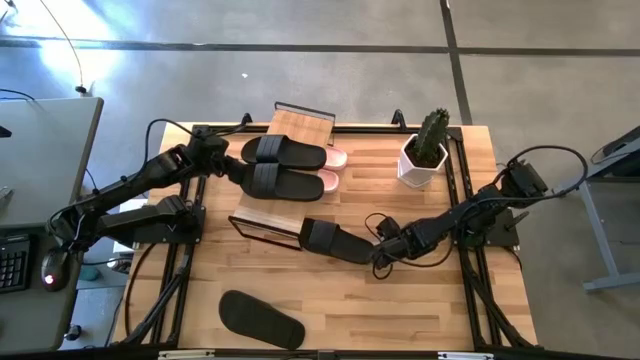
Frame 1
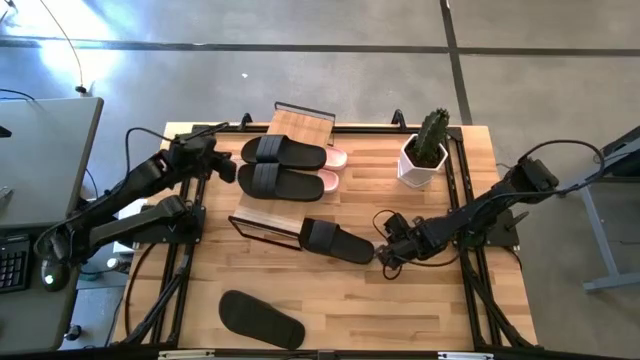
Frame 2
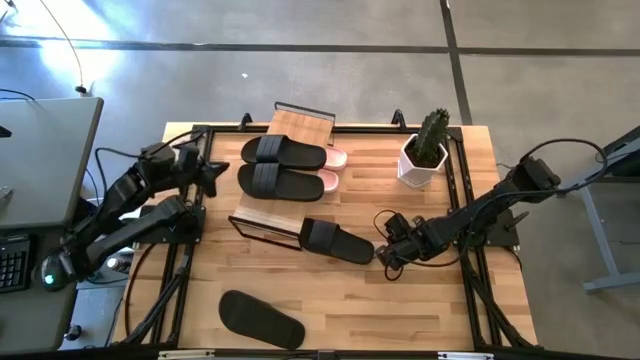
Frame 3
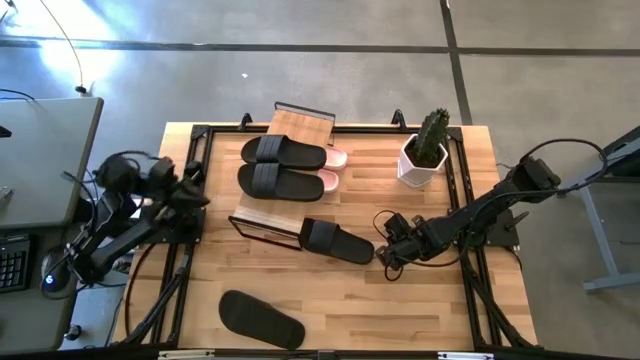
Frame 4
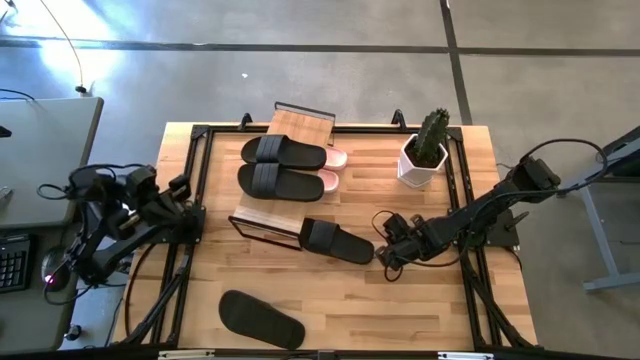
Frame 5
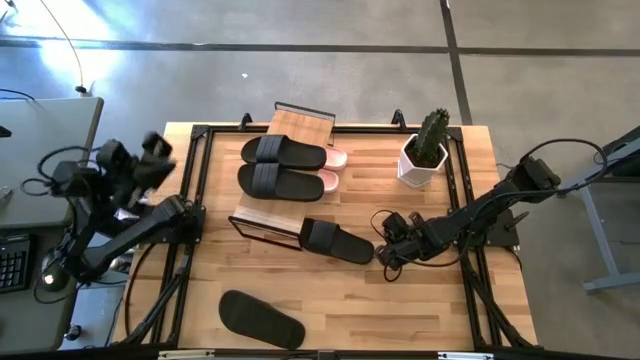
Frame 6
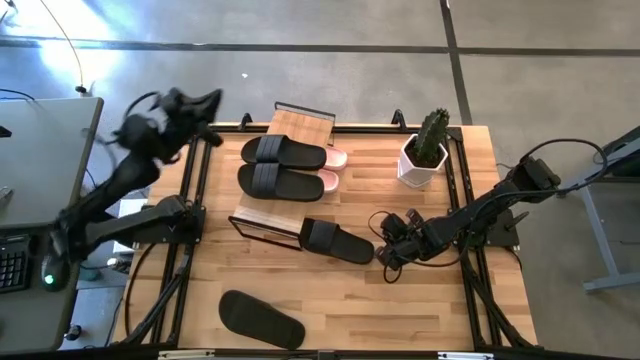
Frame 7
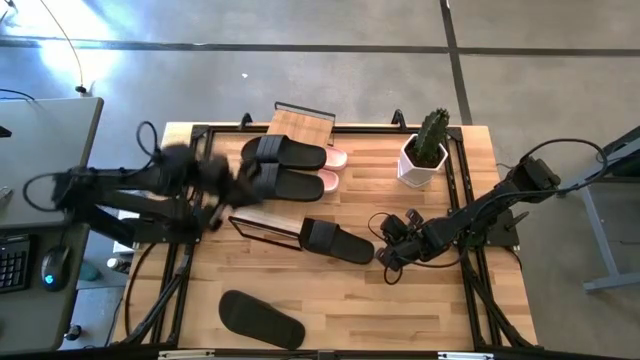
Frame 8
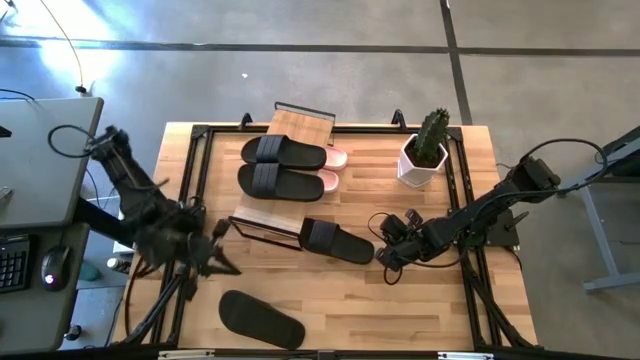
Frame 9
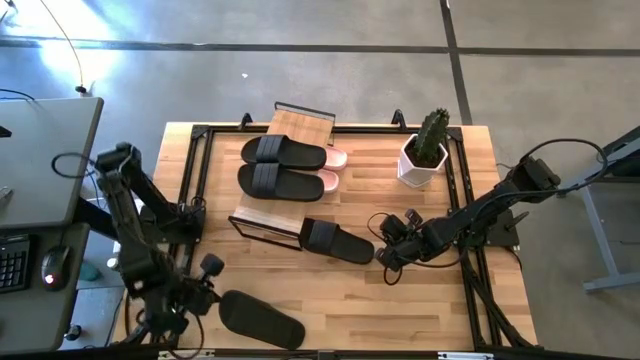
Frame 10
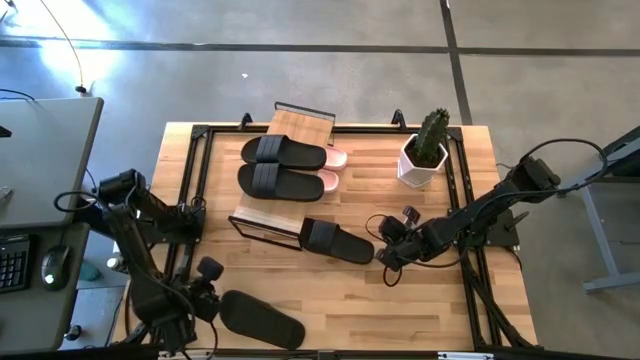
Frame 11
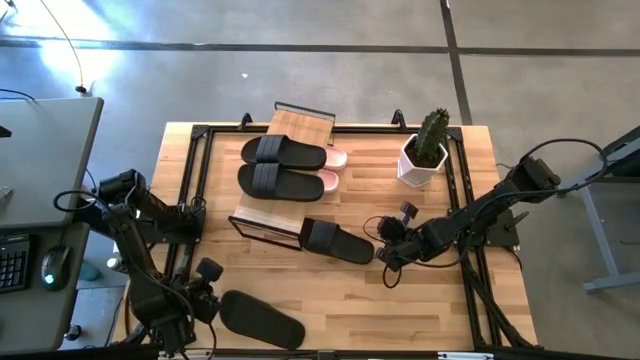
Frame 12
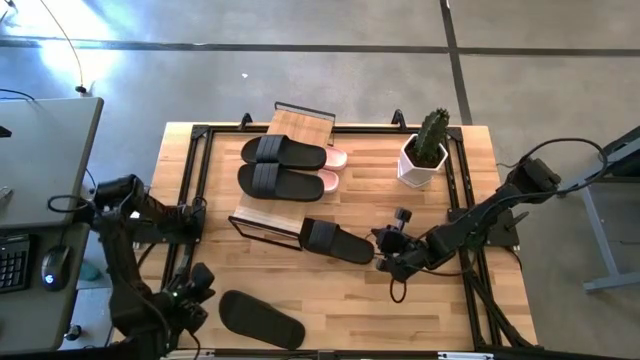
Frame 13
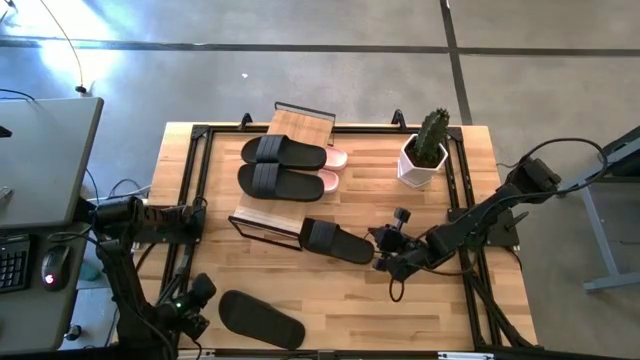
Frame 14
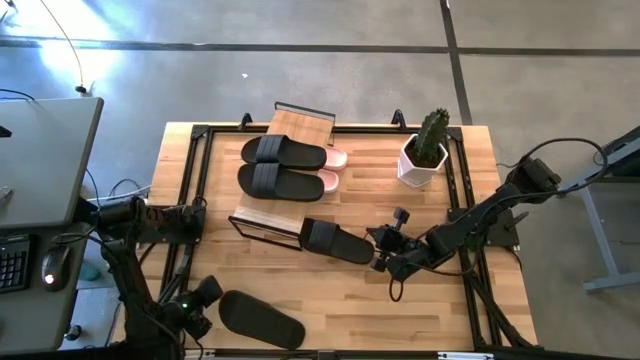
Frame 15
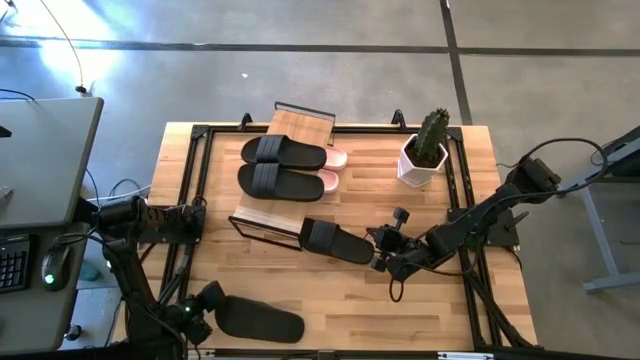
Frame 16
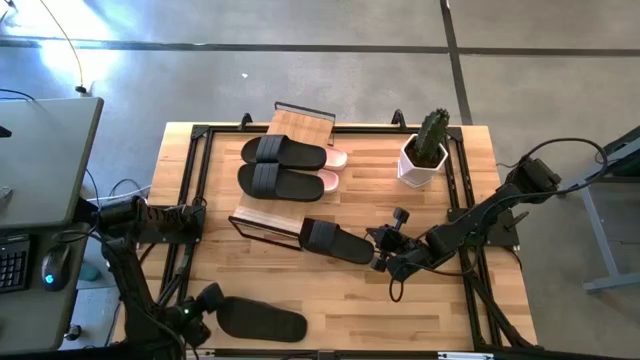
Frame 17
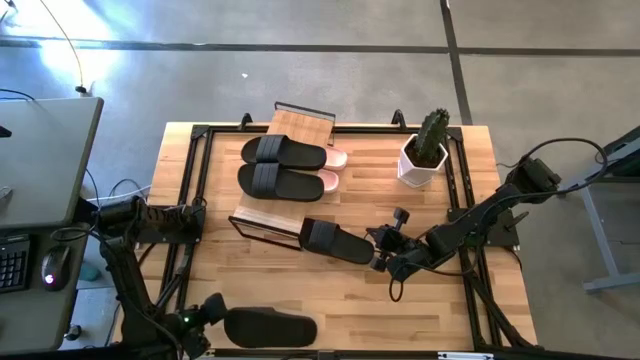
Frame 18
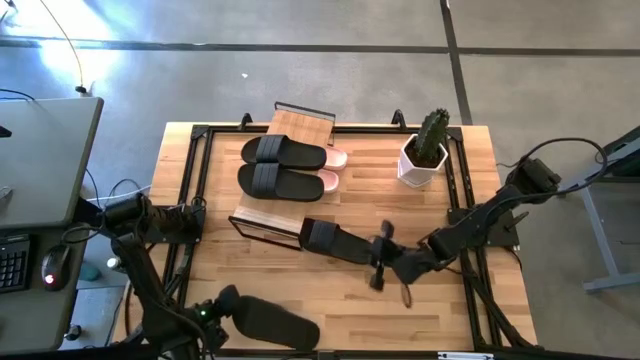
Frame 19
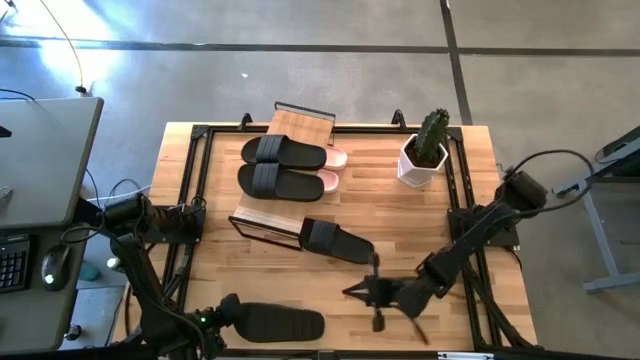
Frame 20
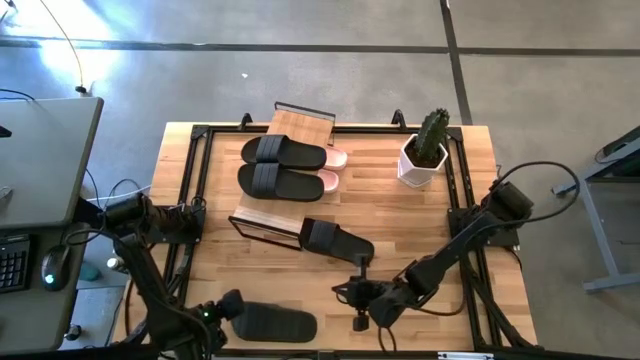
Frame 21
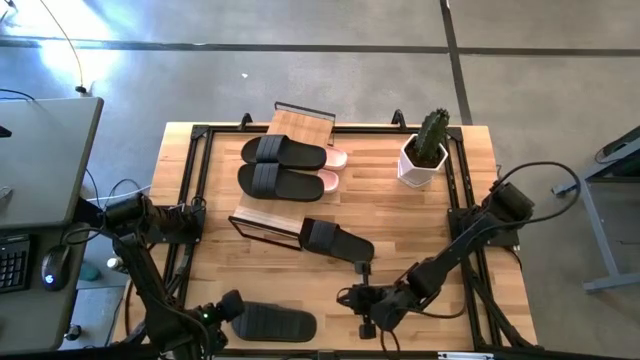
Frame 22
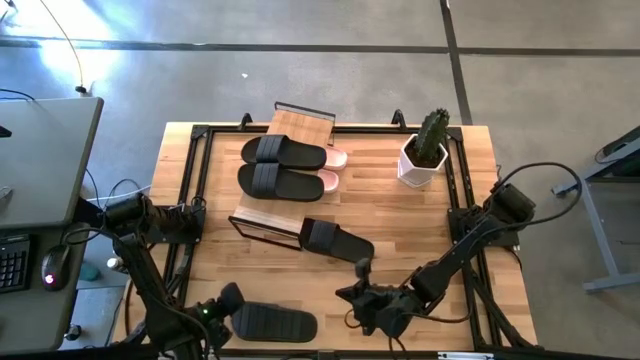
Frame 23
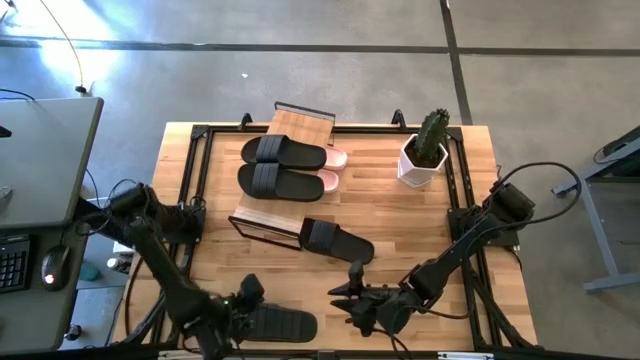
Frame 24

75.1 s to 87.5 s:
Task: Pick and place slides into the shelf
Put the black slides under the shelf

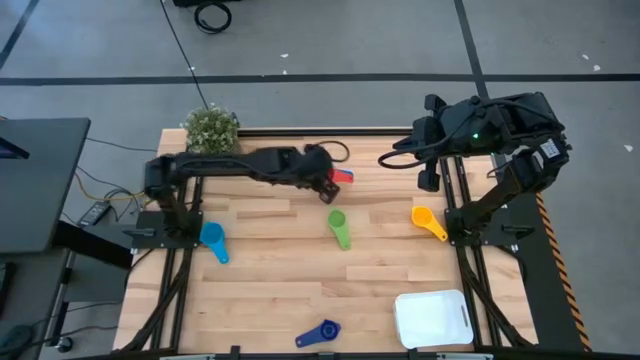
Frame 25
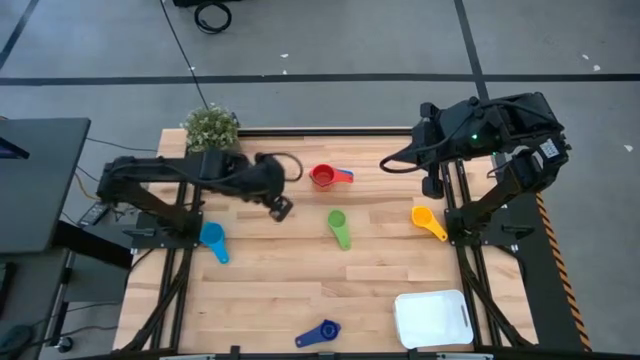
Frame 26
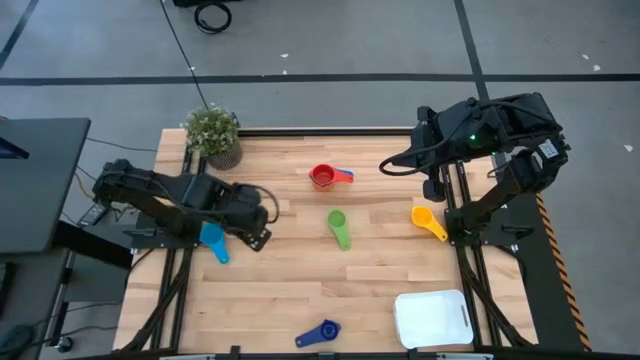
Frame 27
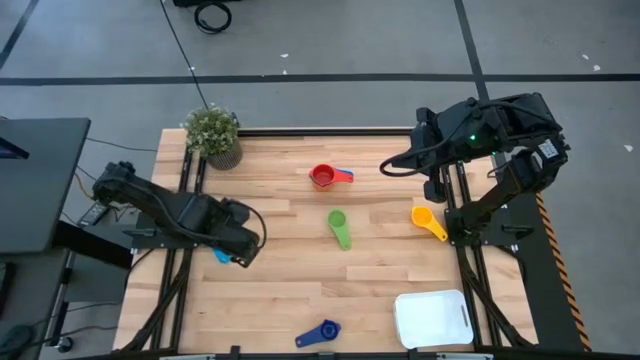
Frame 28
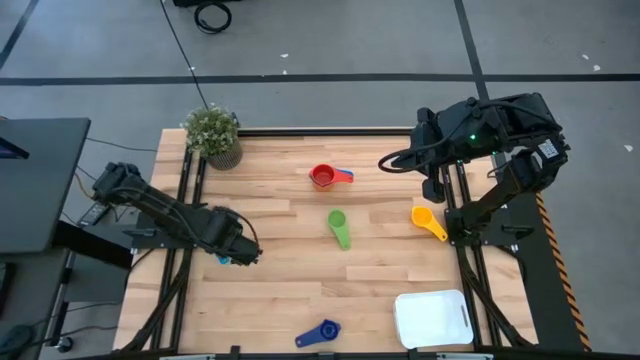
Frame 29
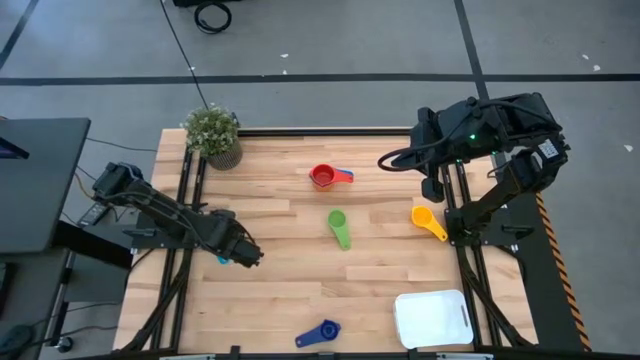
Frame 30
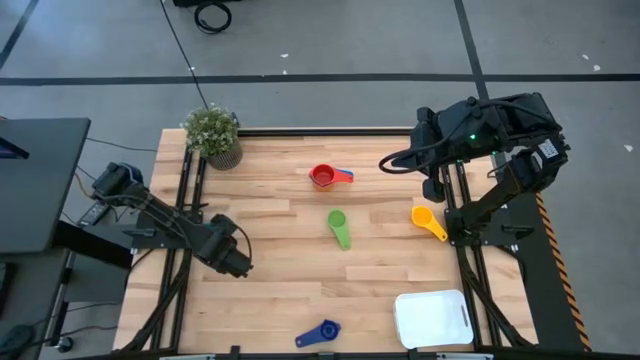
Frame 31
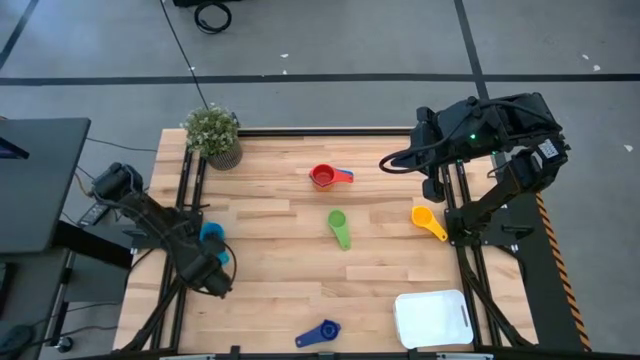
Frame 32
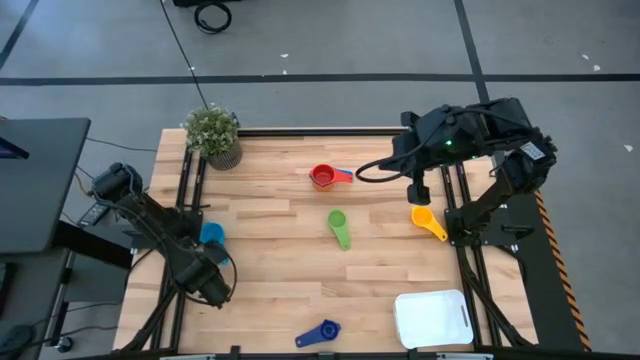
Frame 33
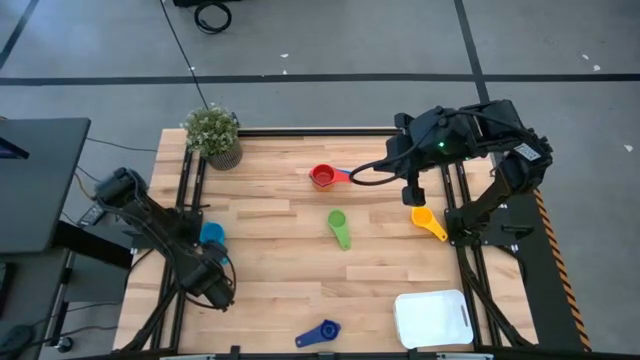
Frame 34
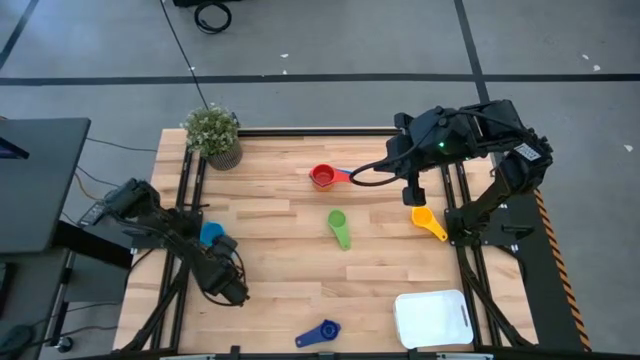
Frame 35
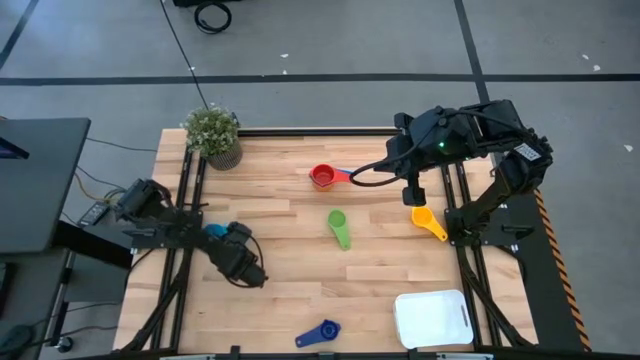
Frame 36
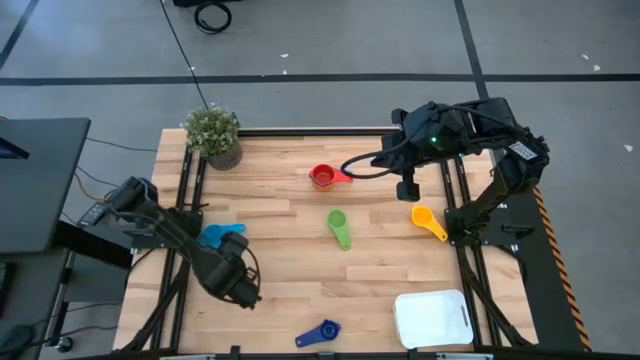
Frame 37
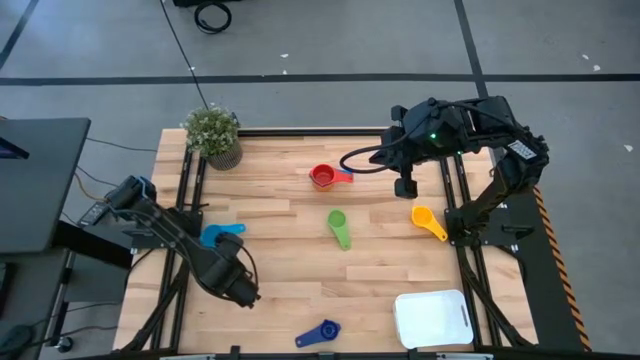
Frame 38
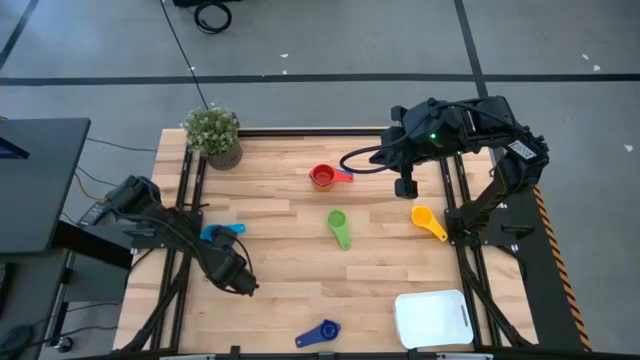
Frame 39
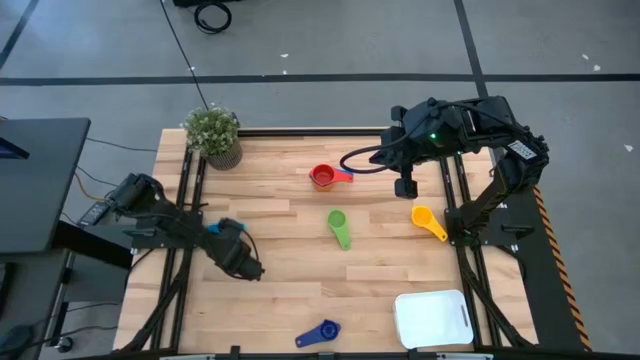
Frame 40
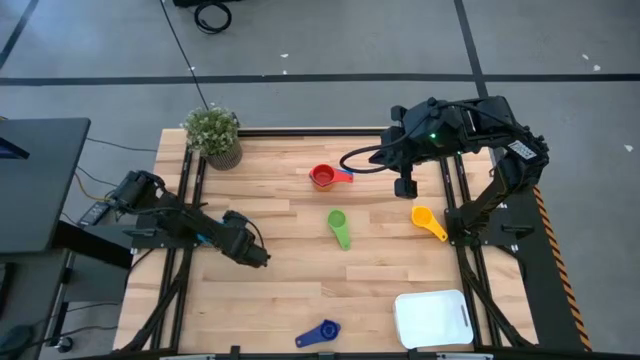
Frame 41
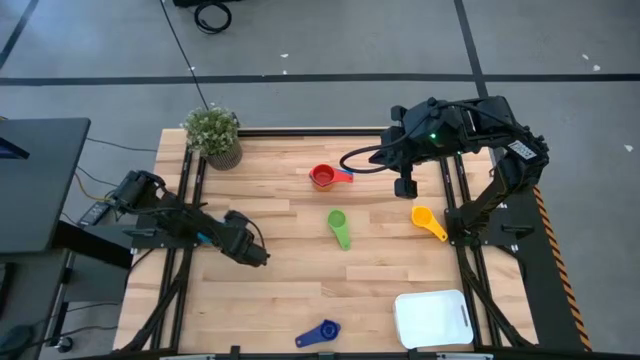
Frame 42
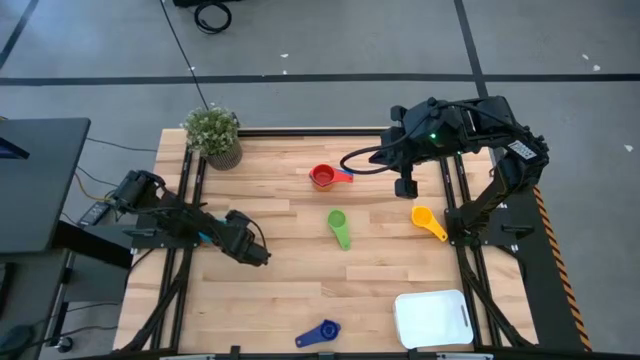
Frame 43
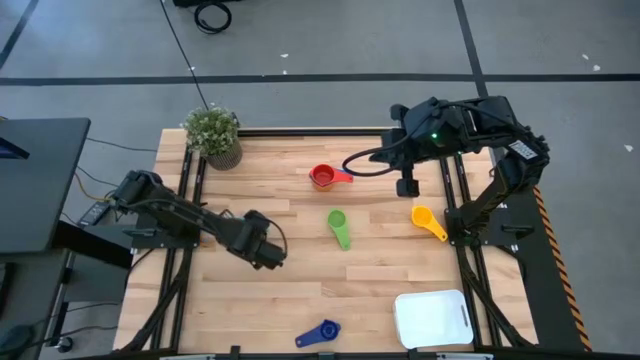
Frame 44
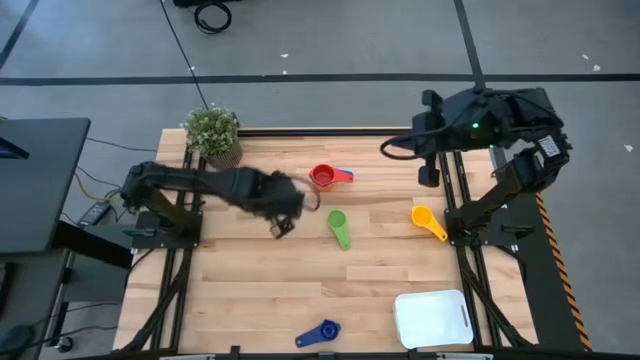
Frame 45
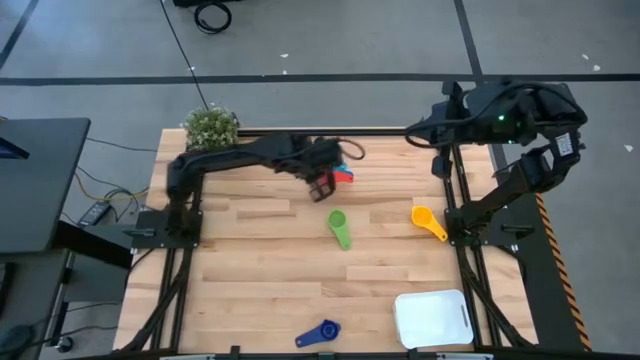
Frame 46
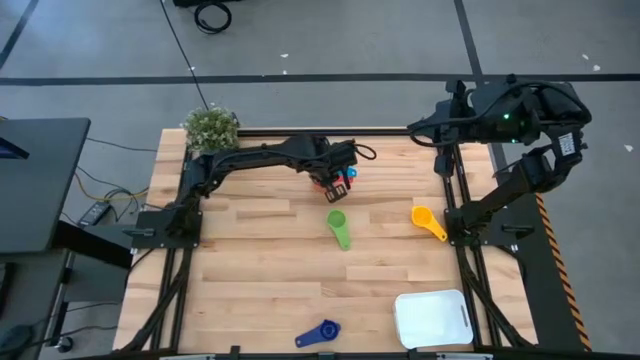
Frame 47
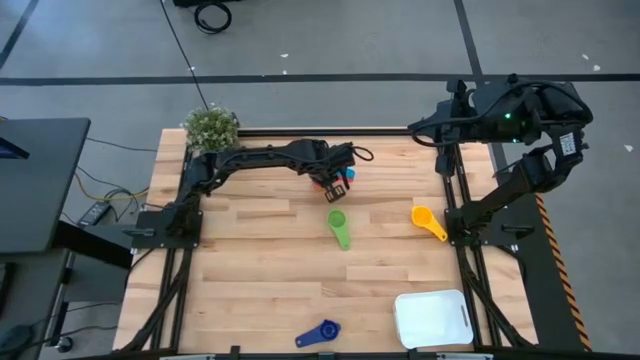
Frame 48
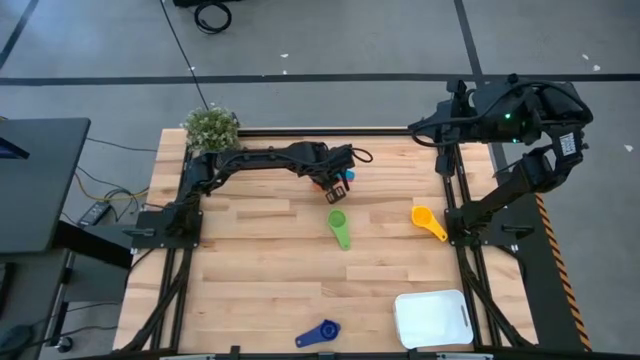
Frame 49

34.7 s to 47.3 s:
Task: Nest measuring cups in basket
Stack the light blue measuring cup on top of the red measuring cup
